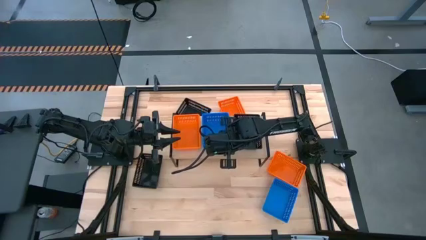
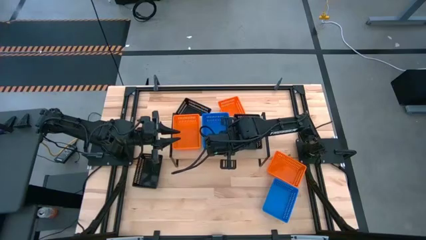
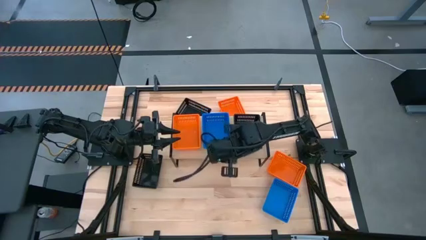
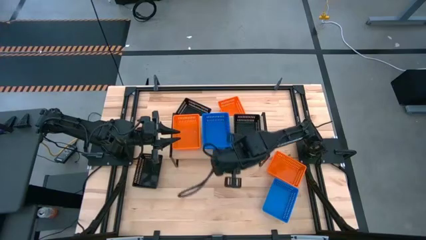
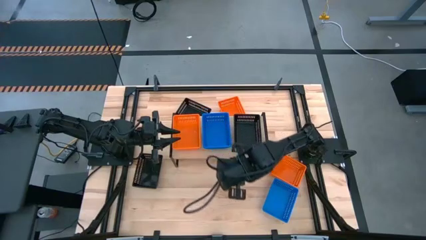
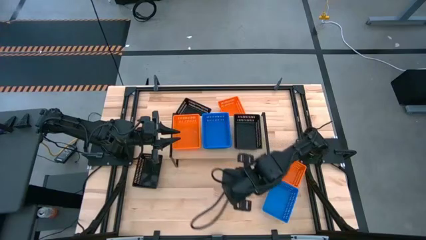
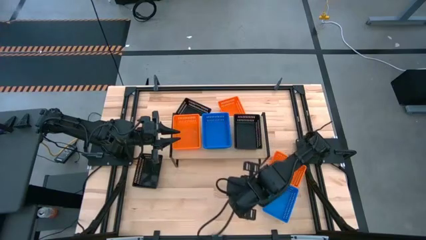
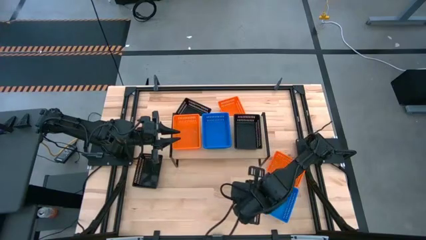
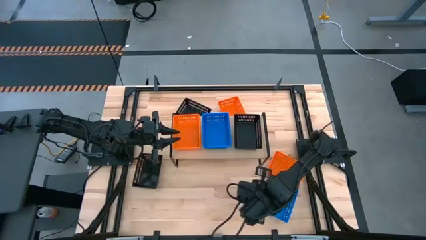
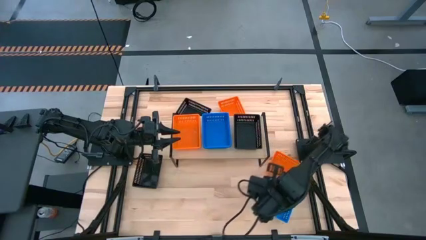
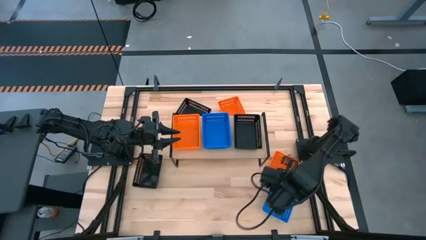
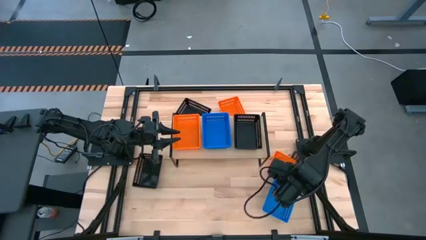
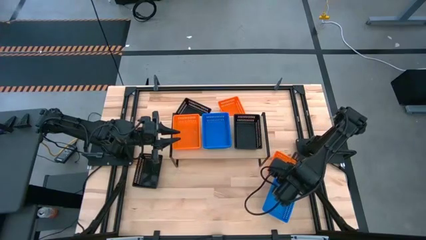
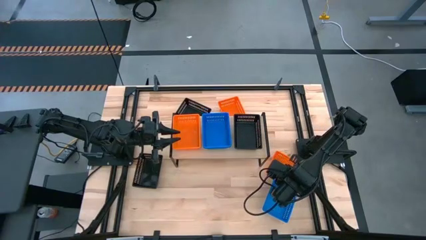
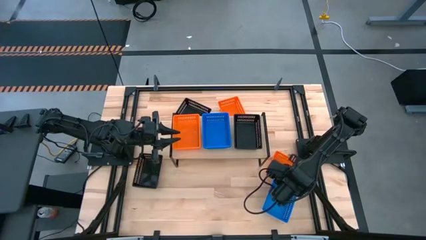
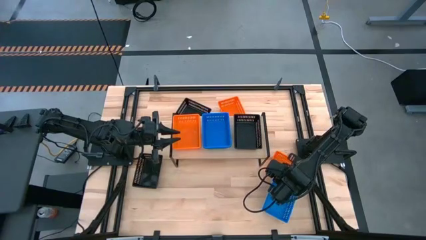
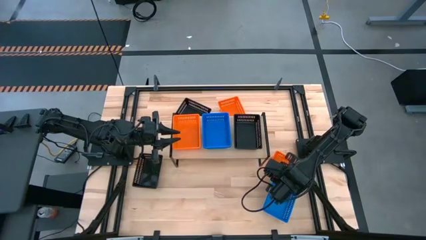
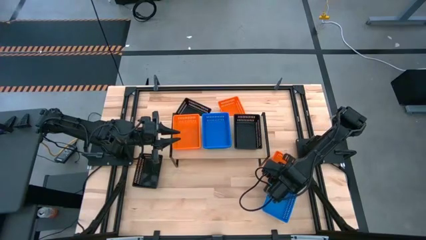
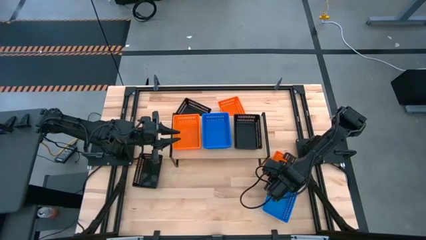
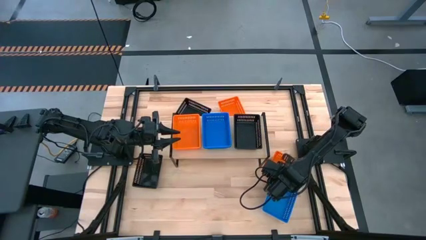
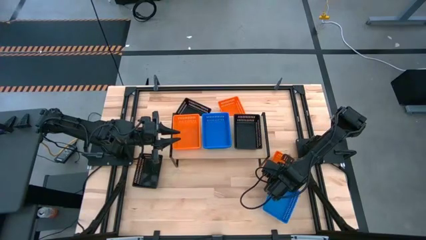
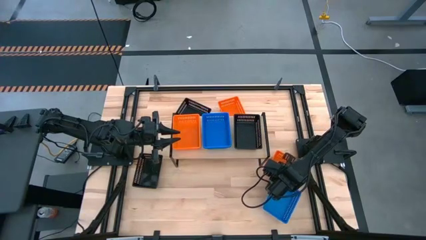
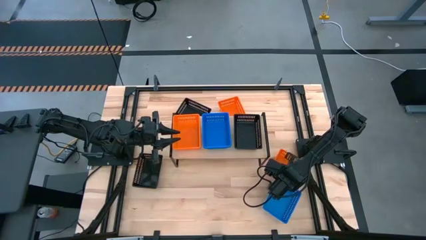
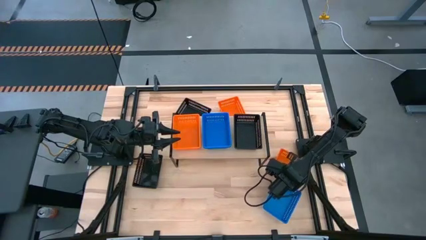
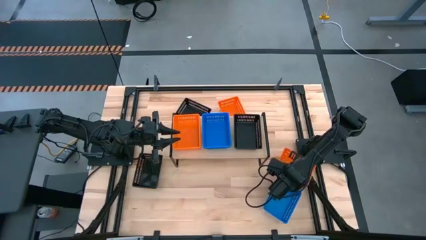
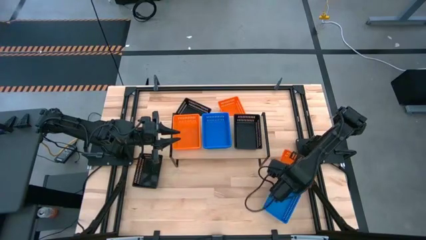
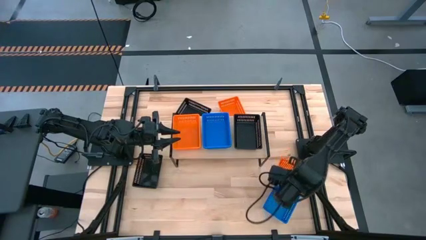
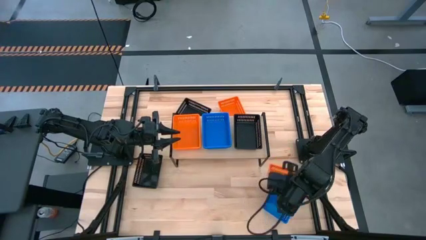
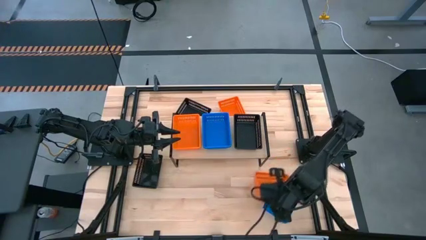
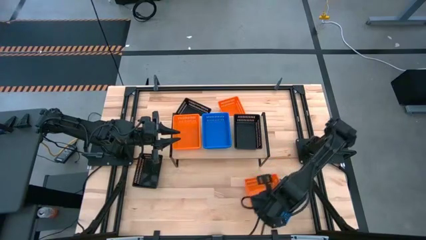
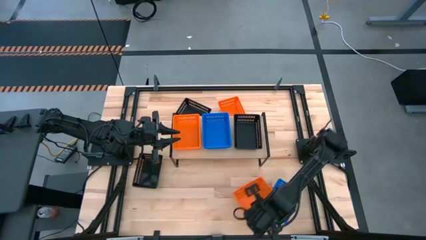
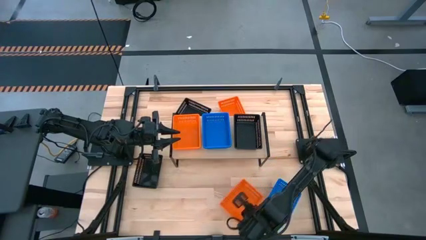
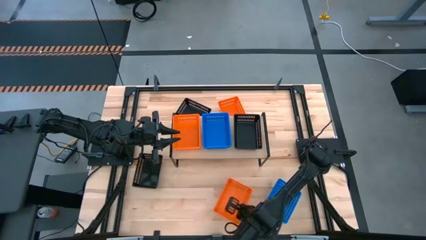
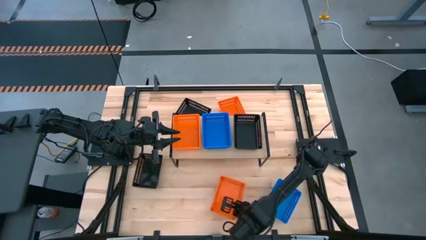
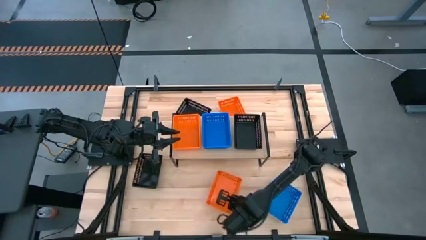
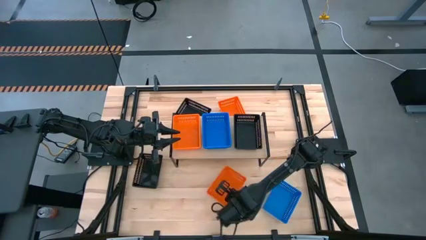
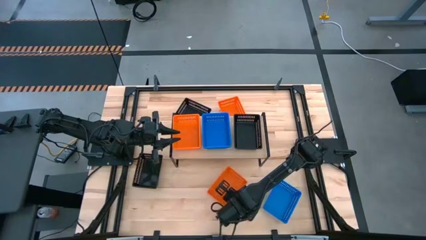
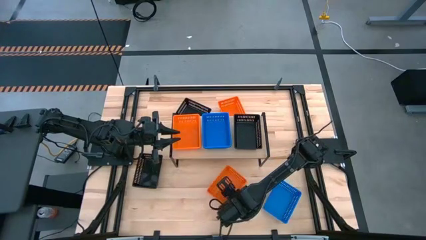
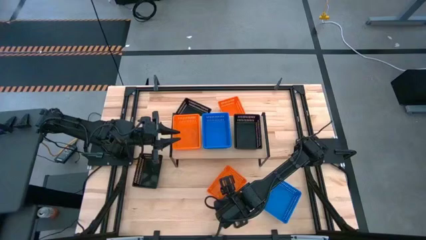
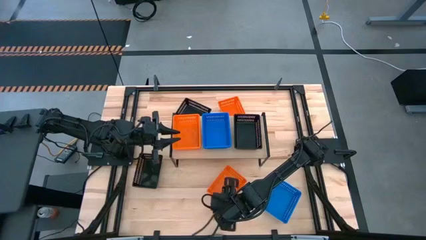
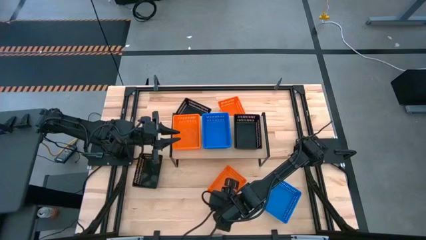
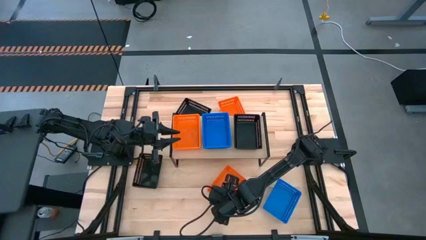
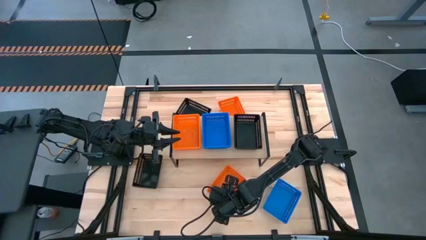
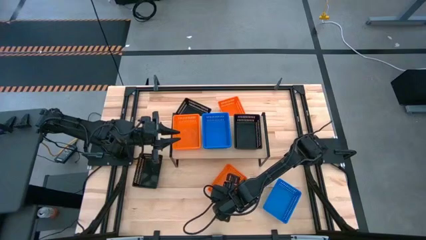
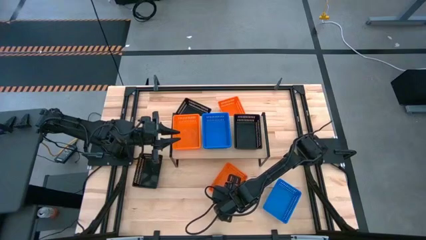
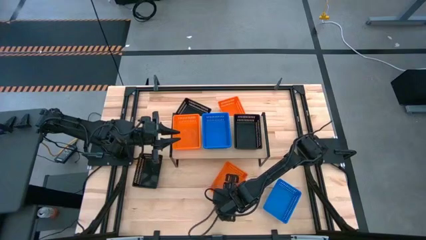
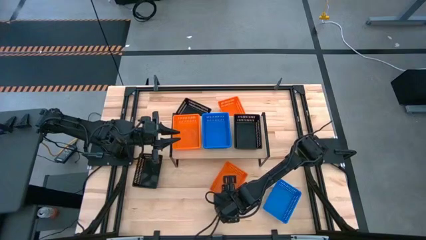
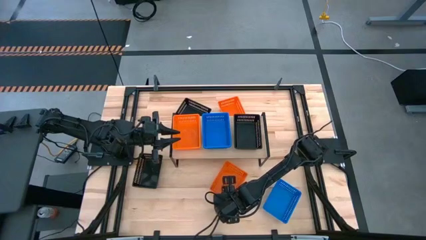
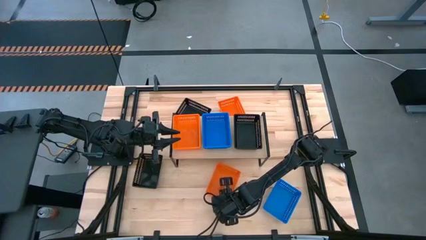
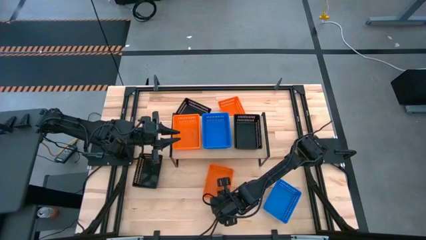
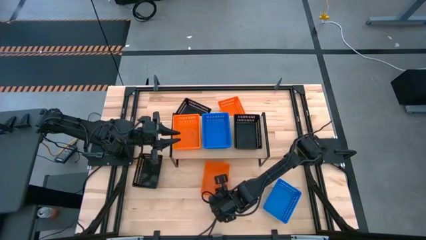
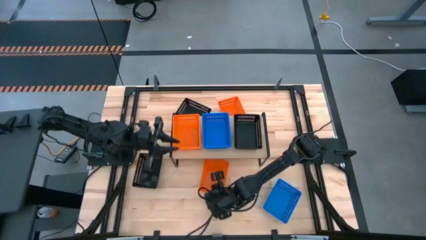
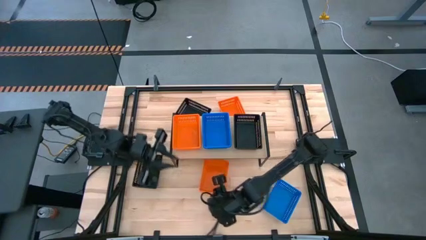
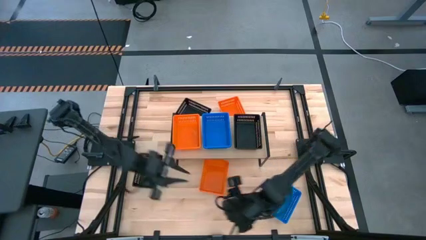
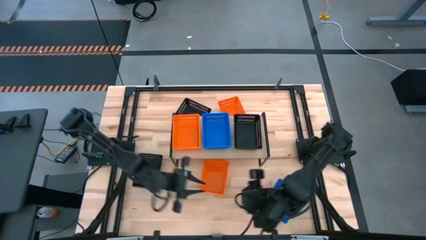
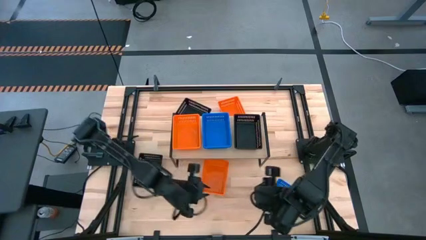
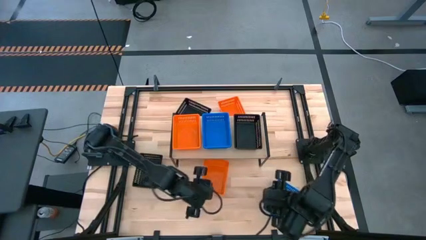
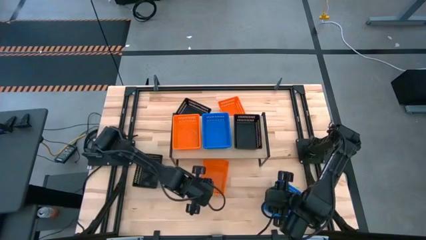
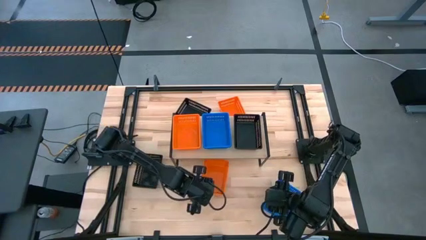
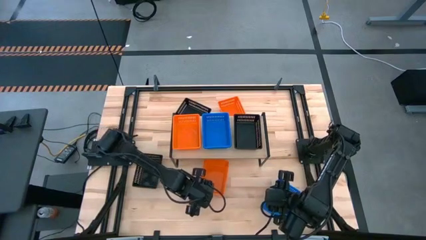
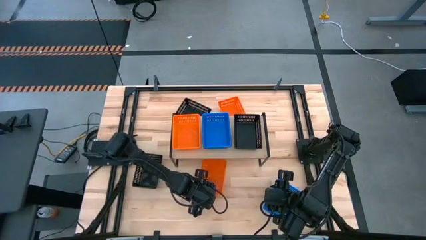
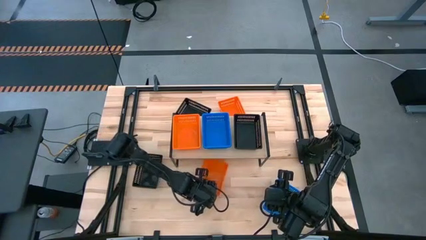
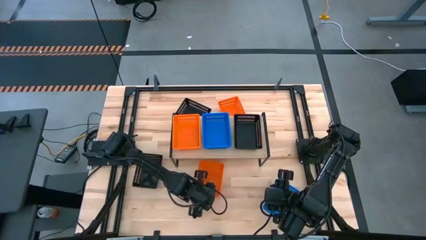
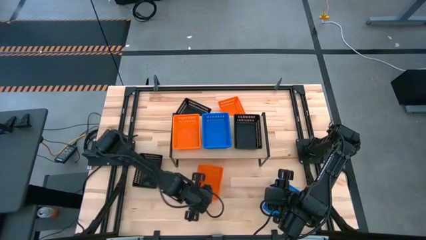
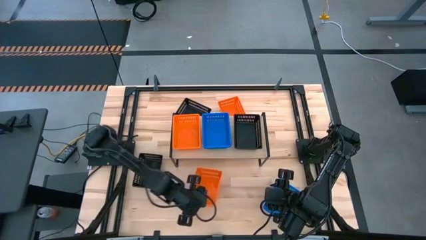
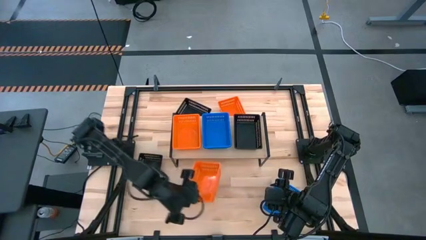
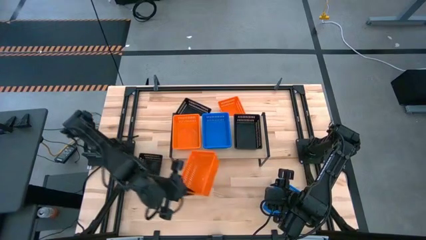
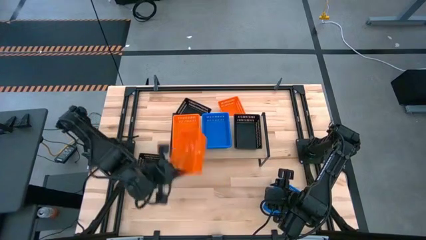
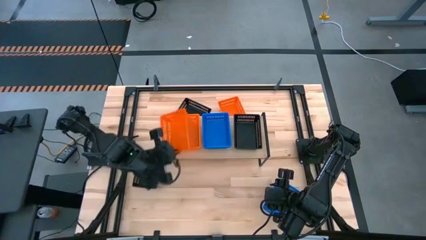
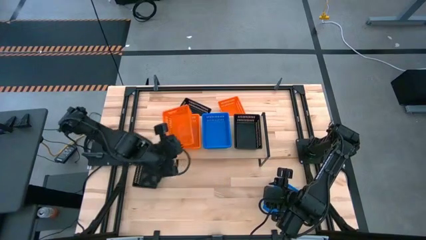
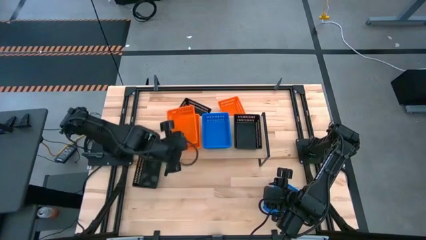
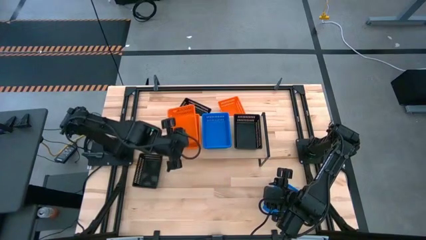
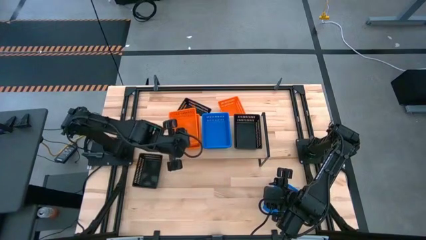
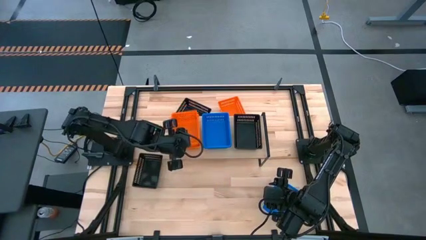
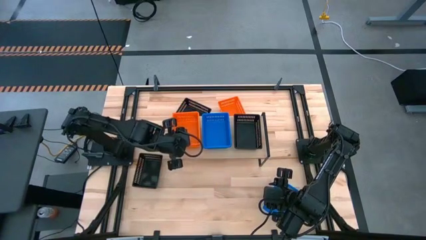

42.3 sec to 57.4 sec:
Task: Stack baskets on shelf by color
Stack the bottom orange bin on top of the orange bin on the shelf
